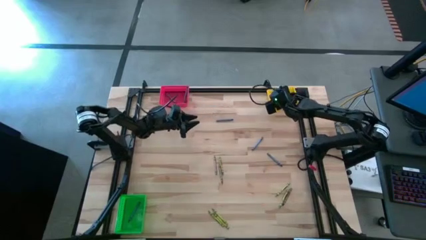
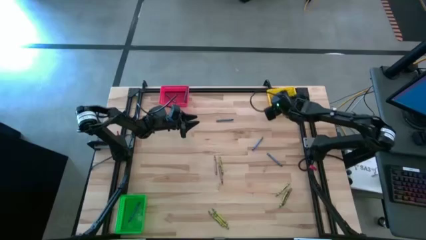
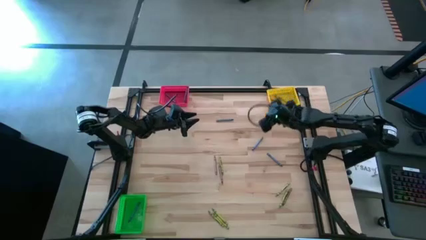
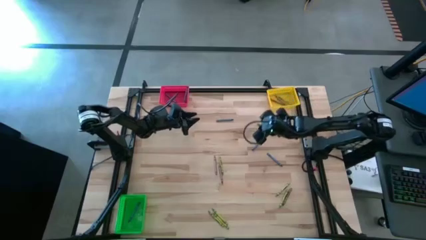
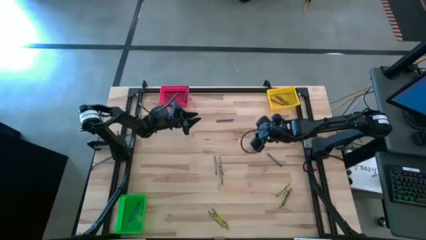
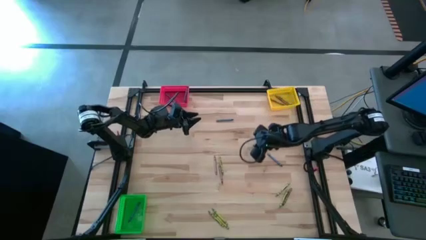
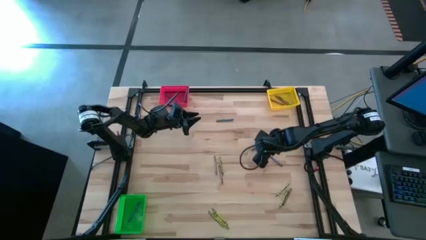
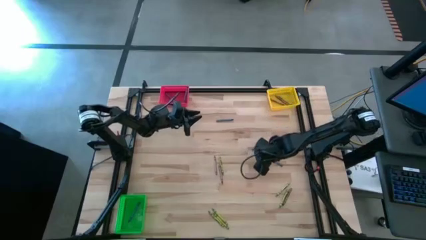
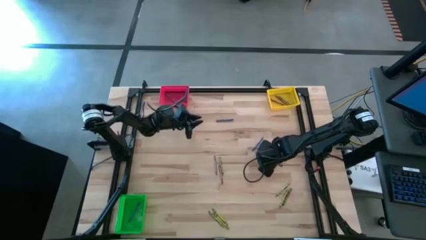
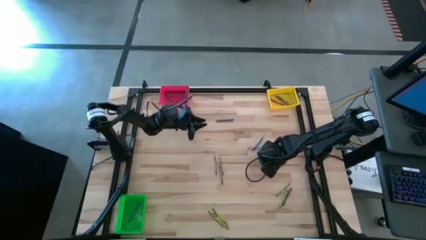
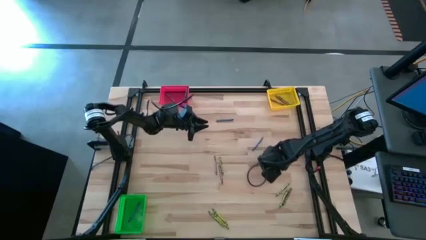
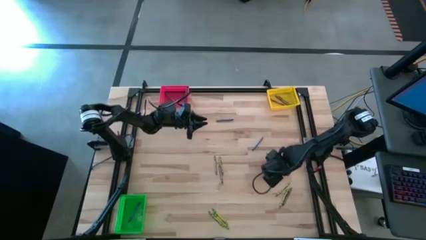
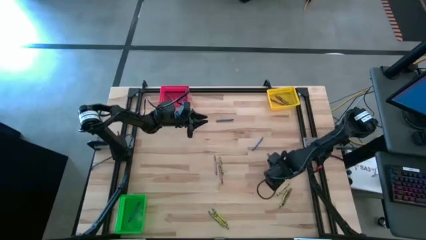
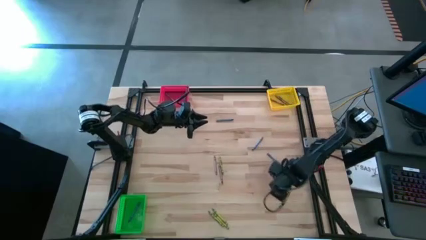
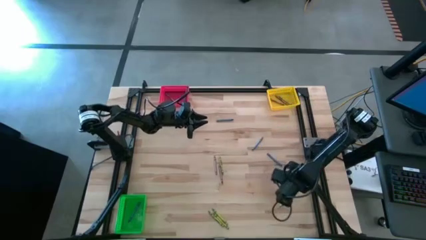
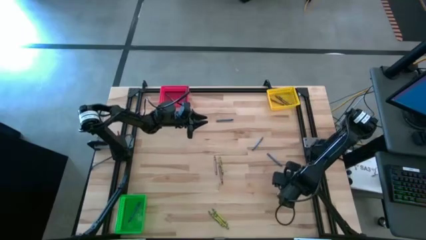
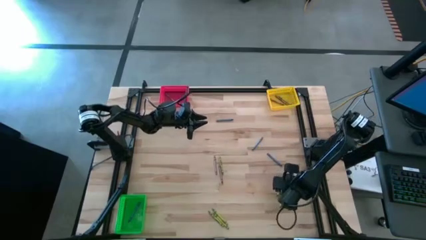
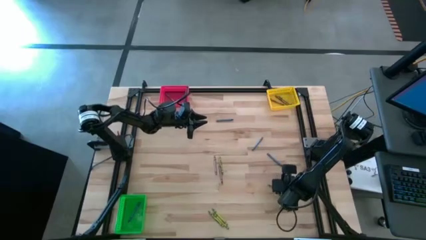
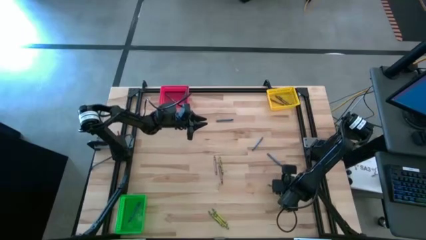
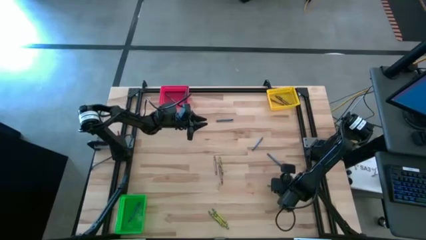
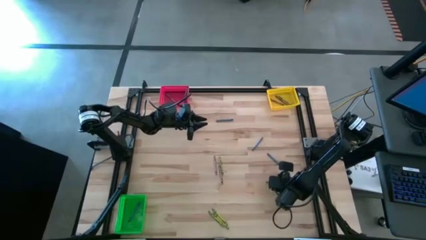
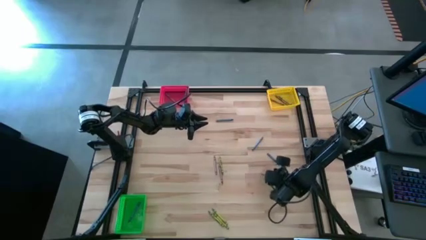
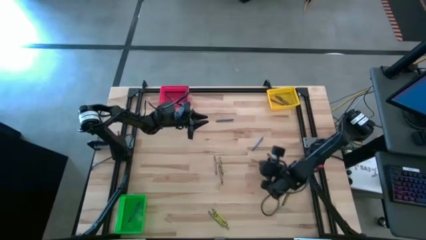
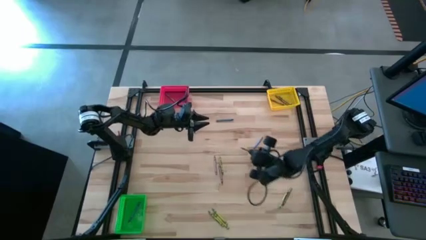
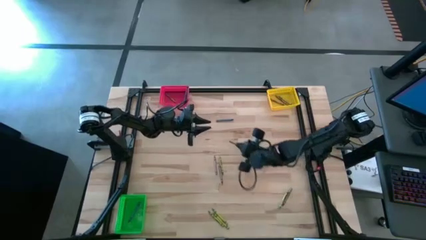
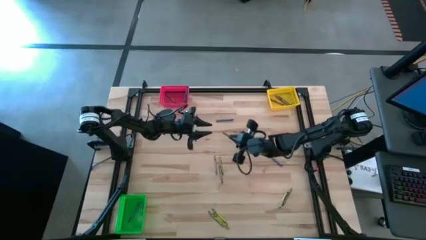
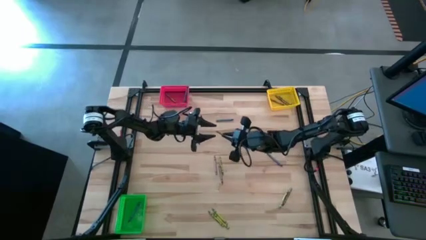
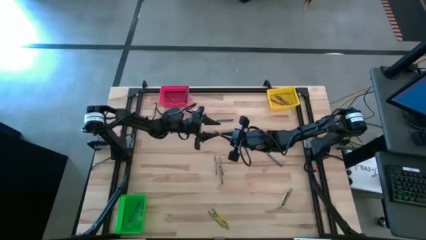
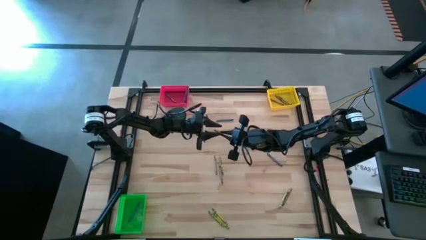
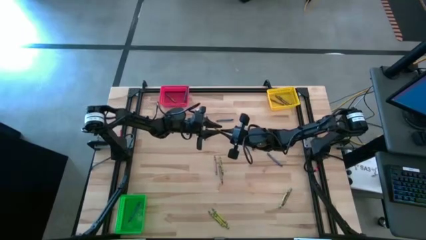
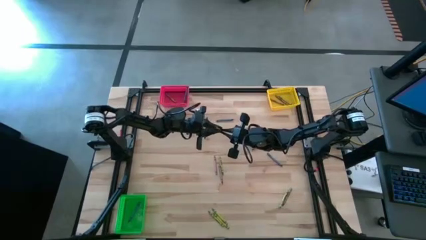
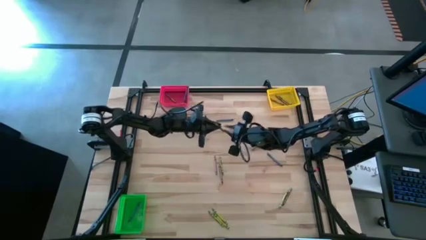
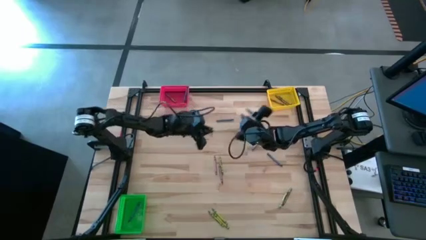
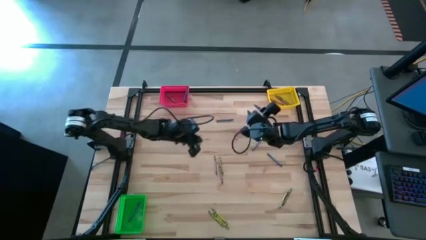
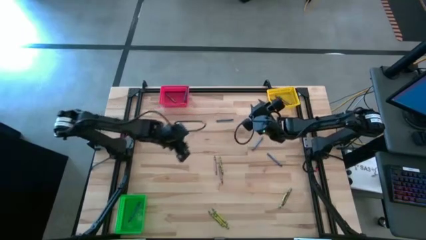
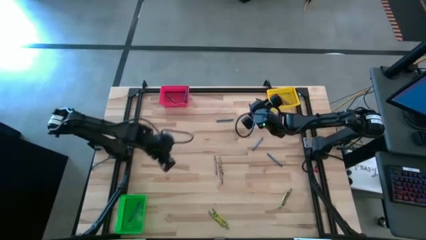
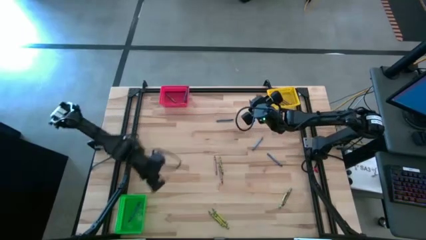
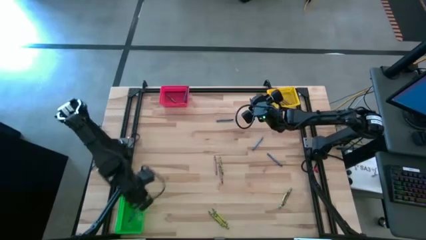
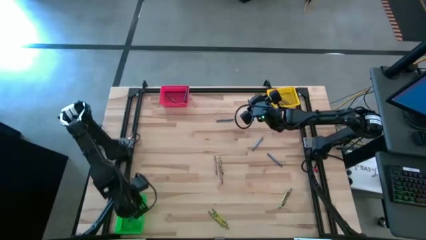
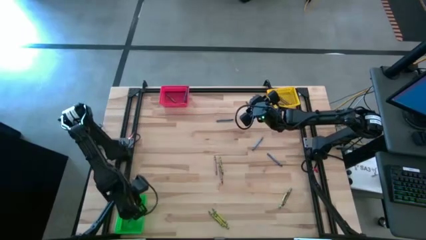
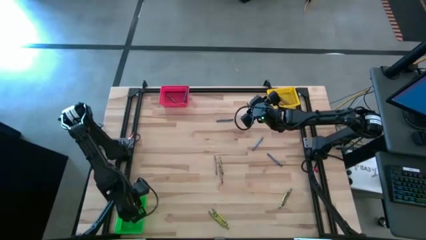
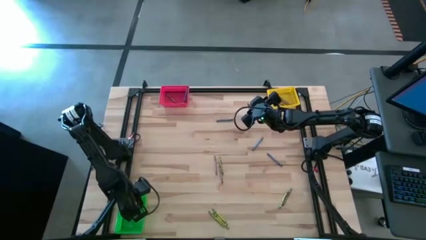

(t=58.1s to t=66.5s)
Task: Sort crayons
Put the green crayon into the green bin

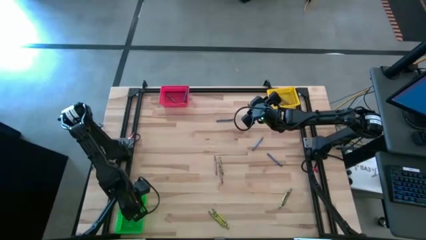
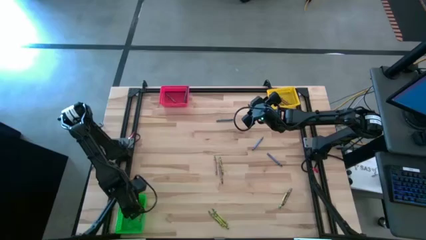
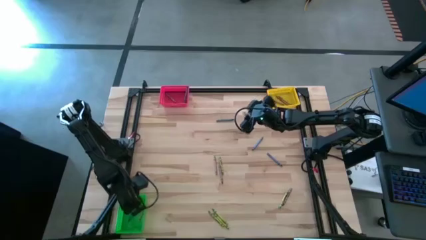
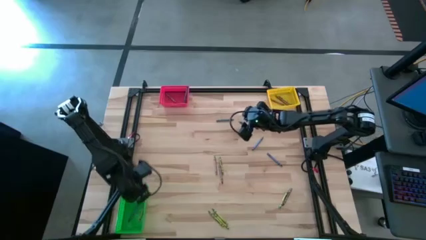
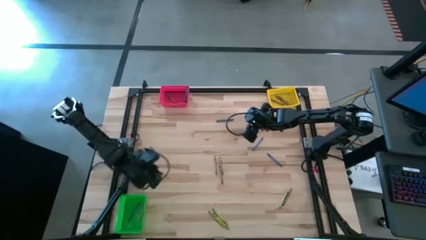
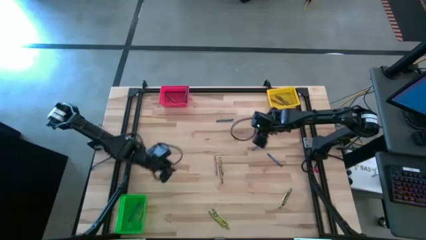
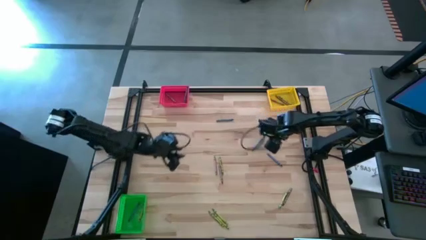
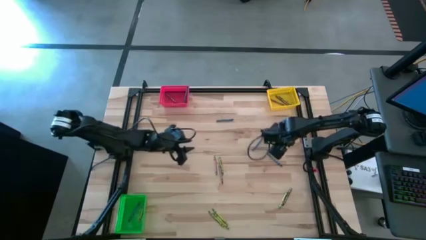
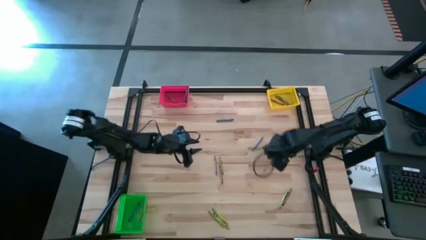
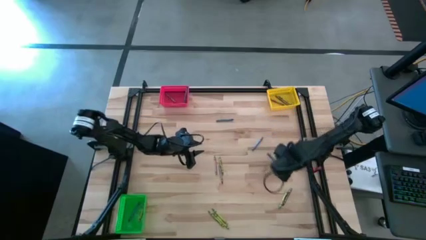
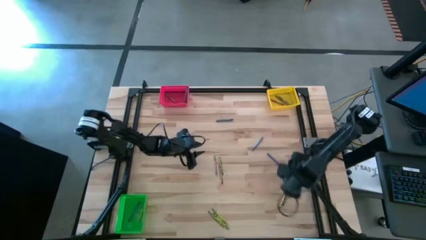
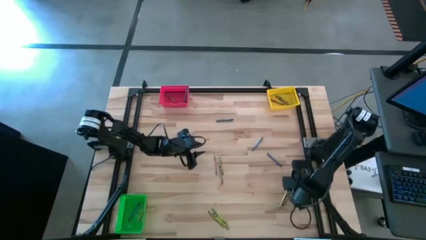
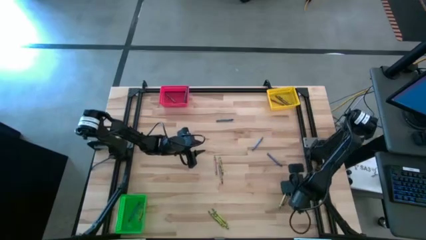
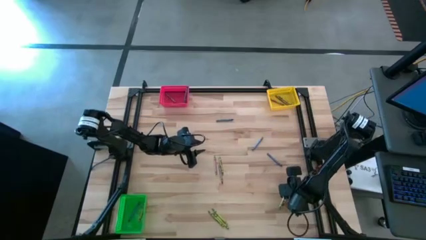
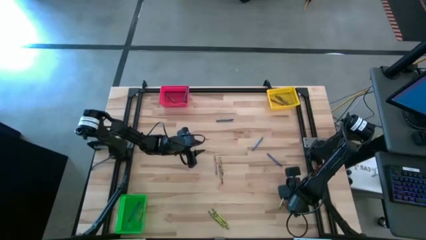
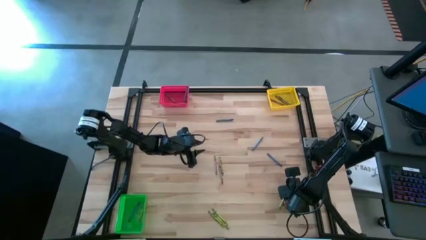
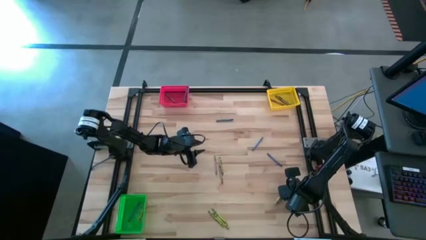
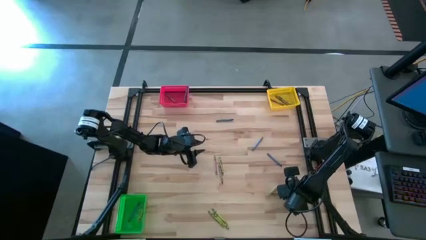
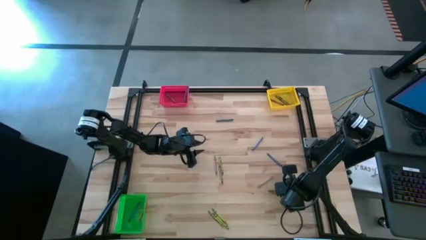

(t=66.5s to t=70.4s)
Put the brown crayon into the red bin

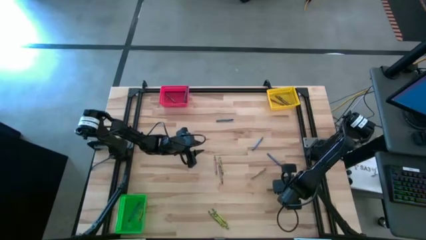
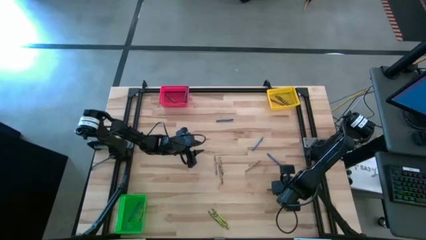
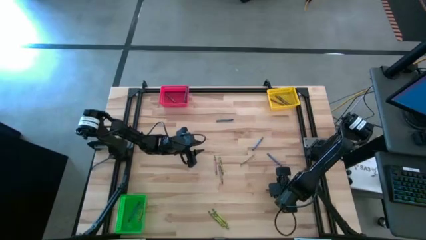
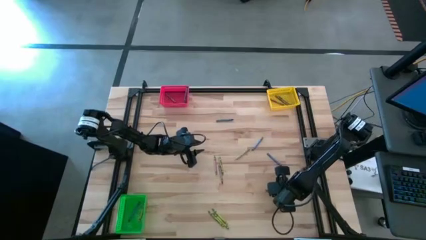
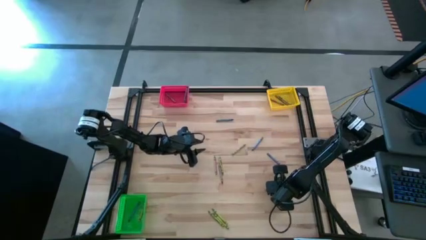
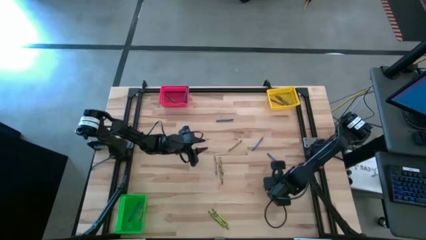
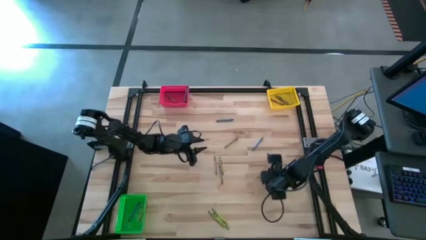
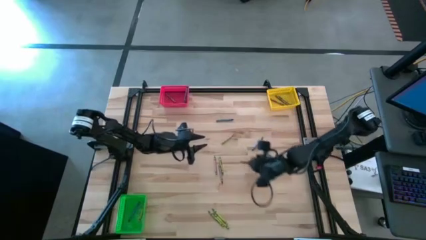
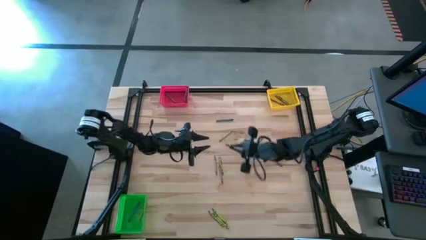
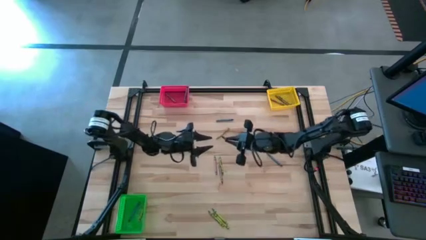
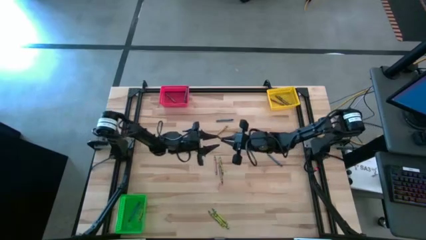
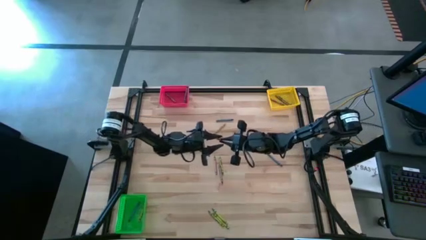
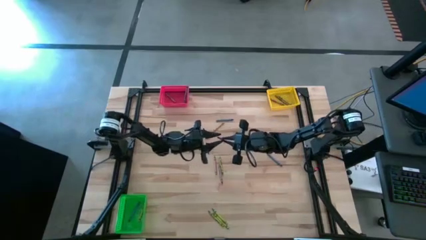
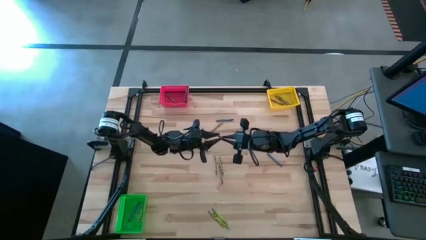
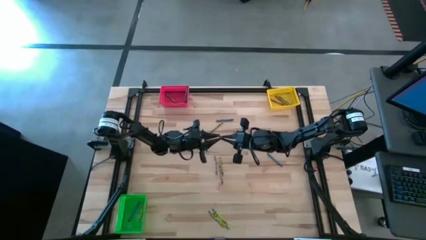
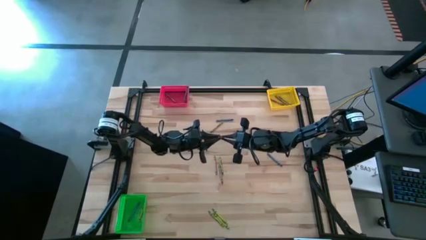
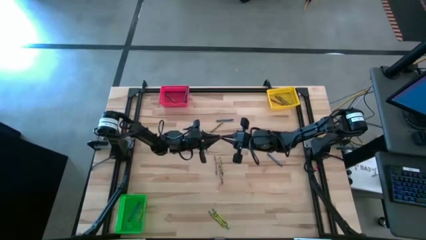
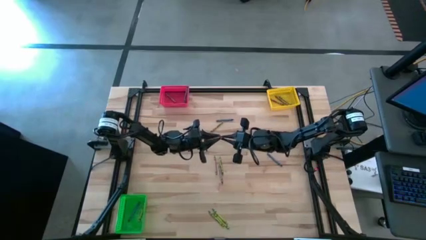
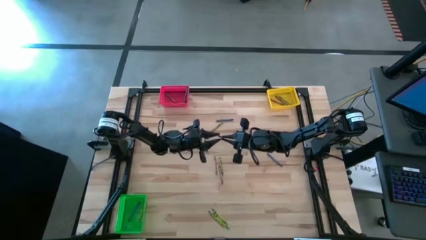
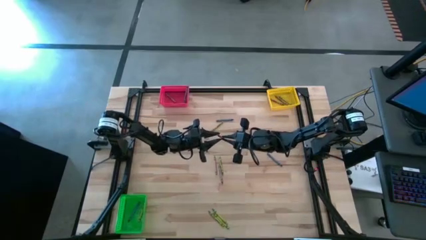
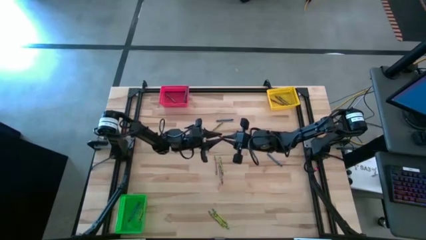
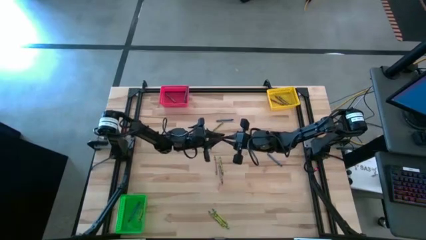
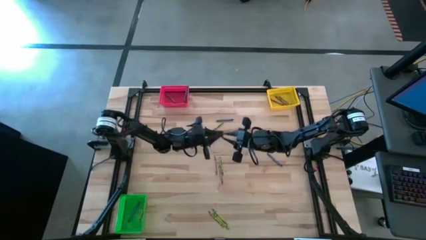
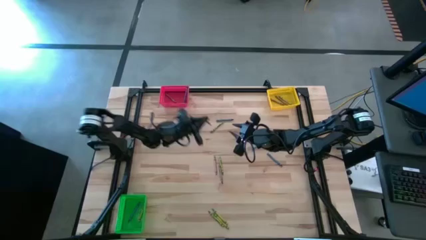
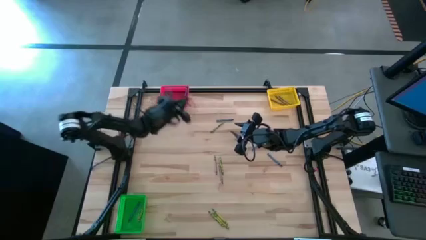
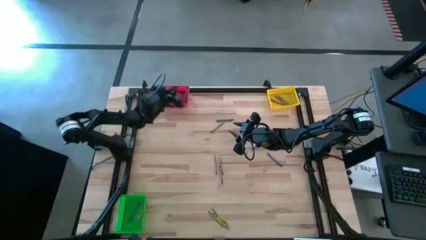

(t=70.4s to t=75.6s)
Put the brown crayon into the red bin
